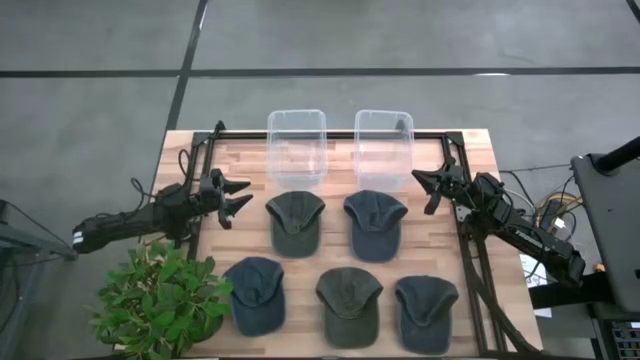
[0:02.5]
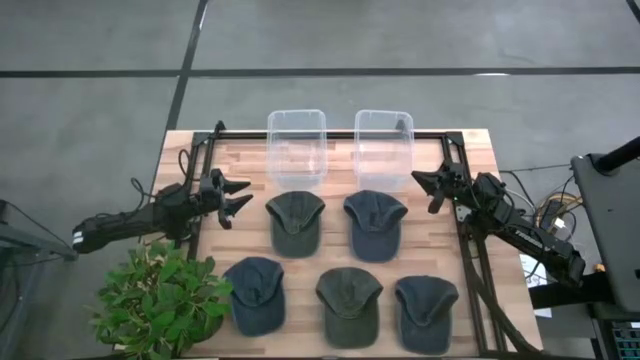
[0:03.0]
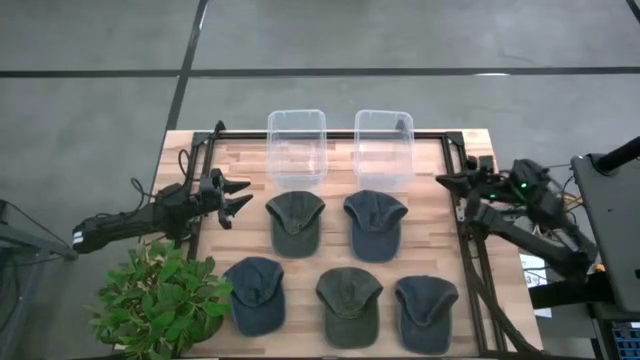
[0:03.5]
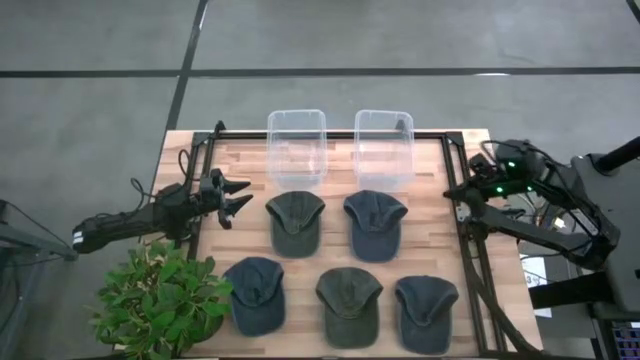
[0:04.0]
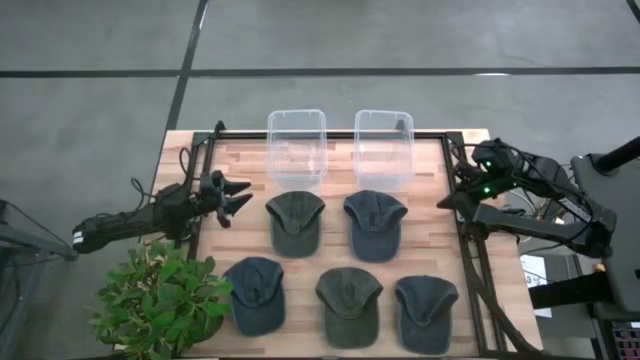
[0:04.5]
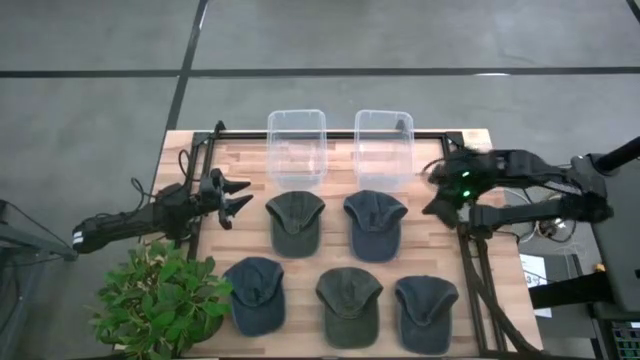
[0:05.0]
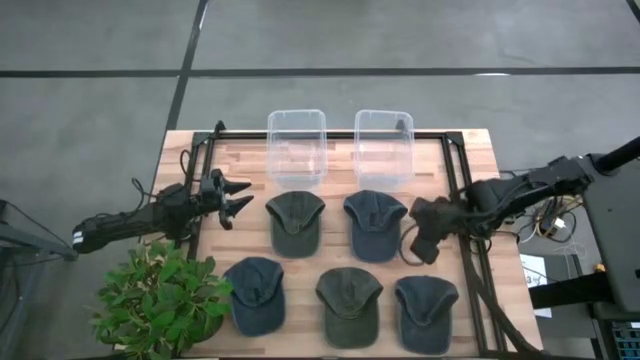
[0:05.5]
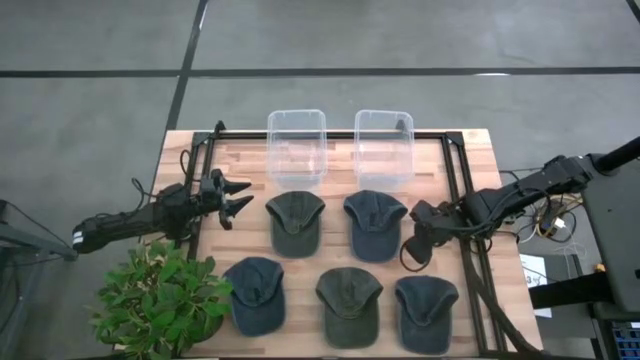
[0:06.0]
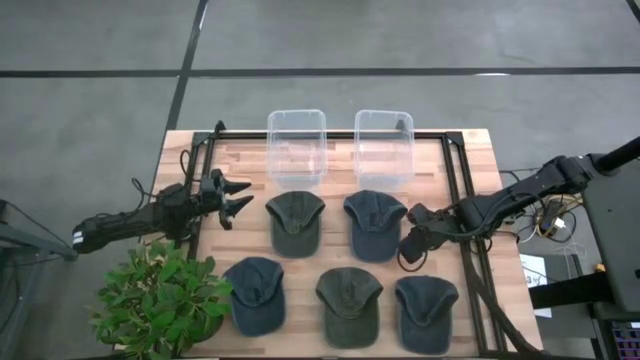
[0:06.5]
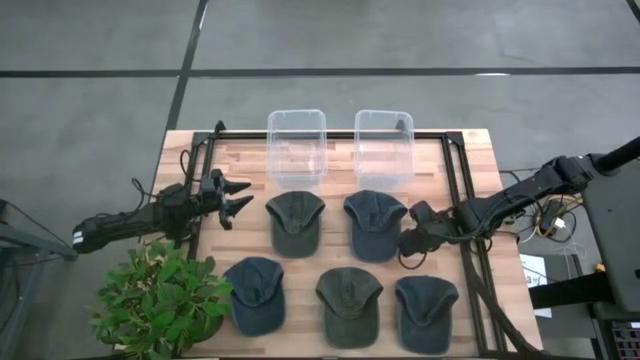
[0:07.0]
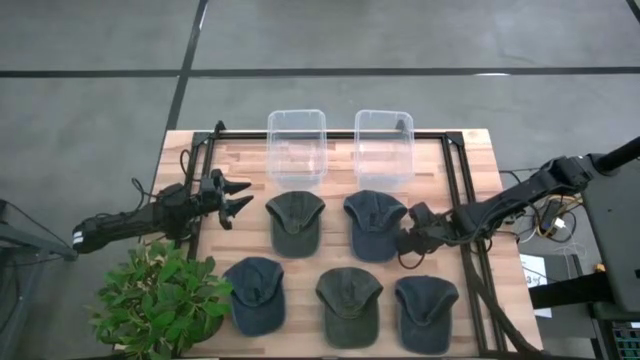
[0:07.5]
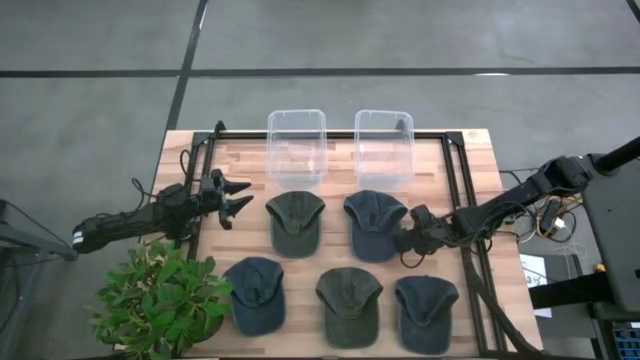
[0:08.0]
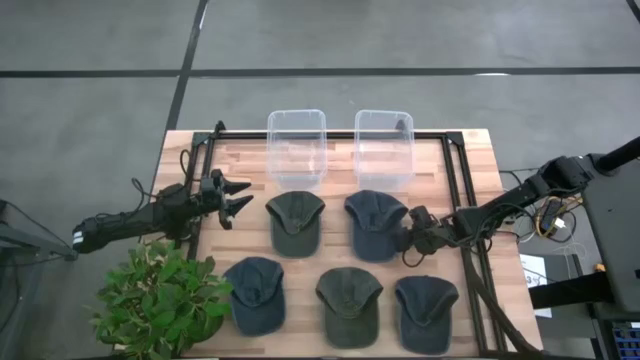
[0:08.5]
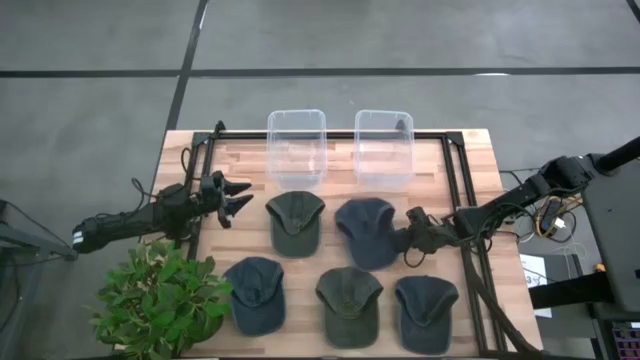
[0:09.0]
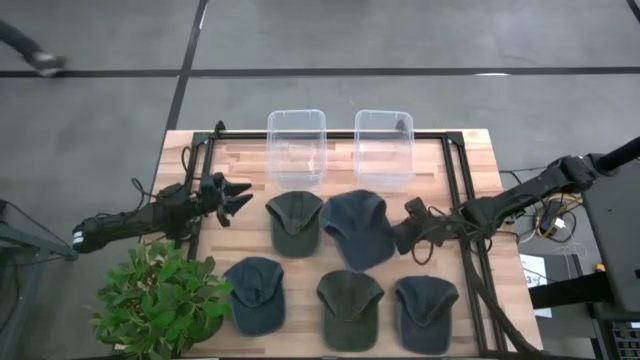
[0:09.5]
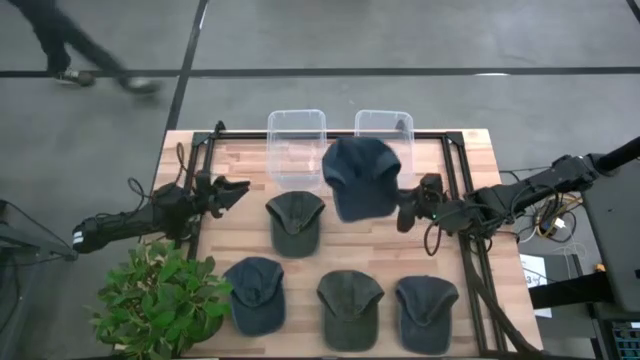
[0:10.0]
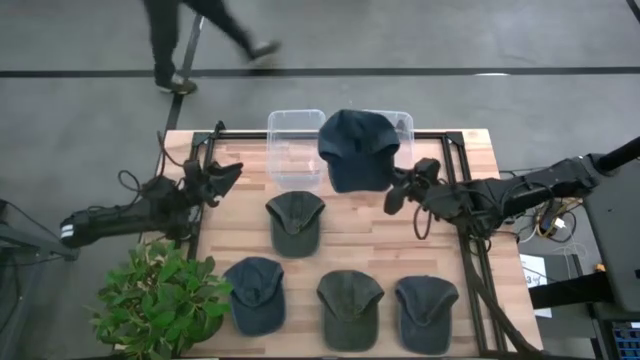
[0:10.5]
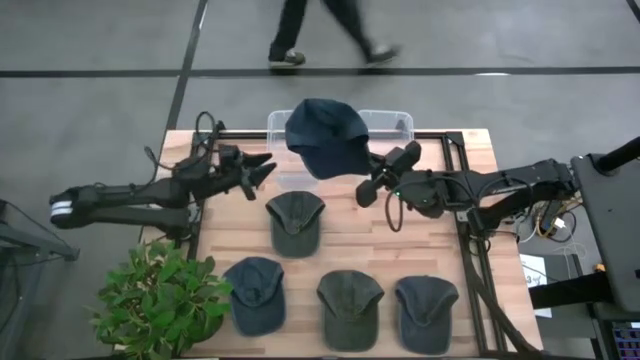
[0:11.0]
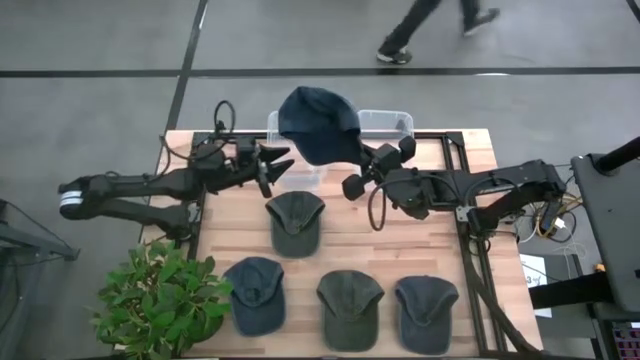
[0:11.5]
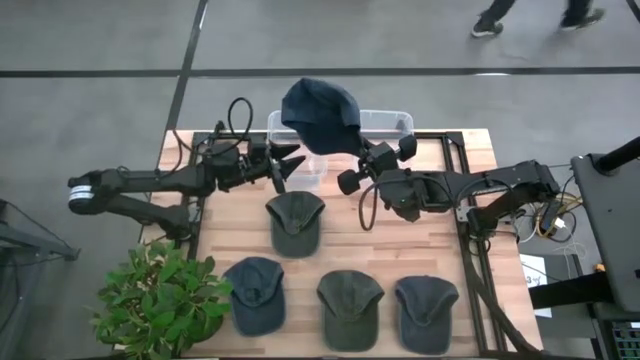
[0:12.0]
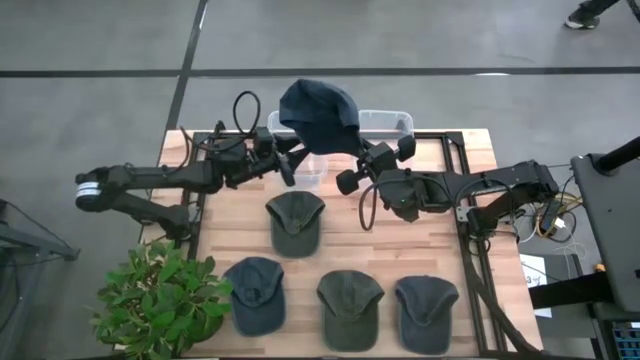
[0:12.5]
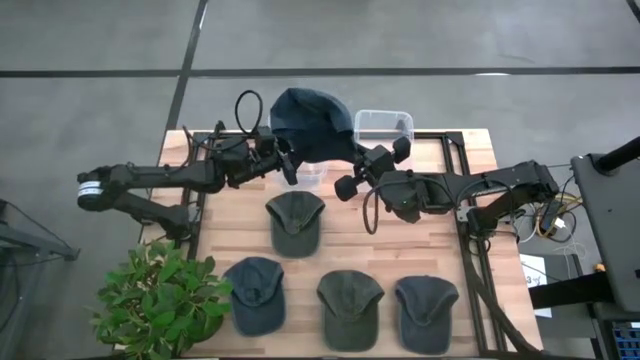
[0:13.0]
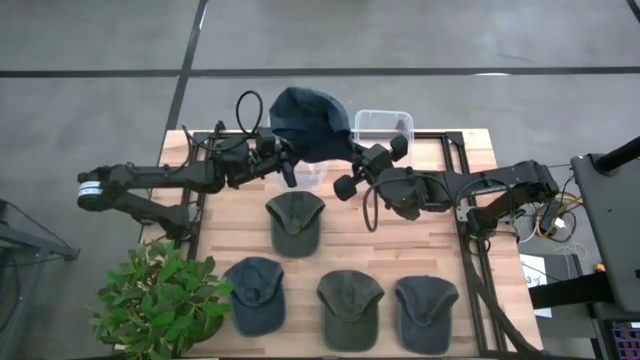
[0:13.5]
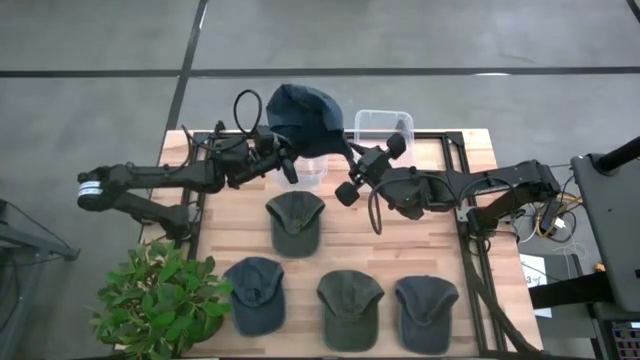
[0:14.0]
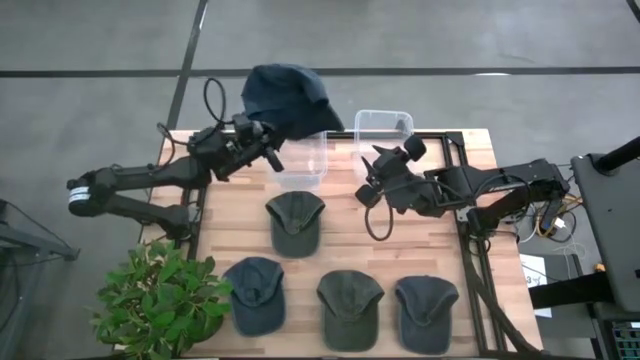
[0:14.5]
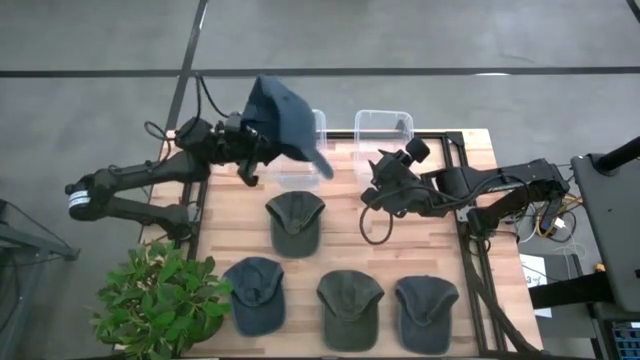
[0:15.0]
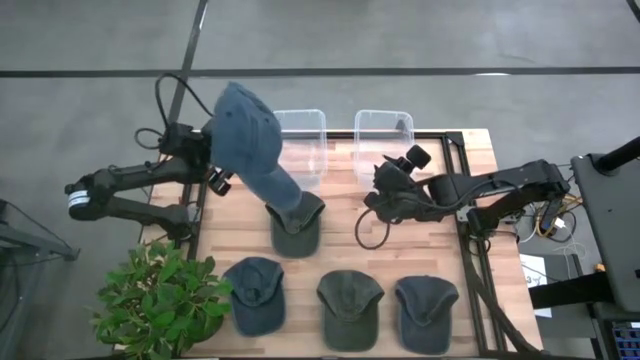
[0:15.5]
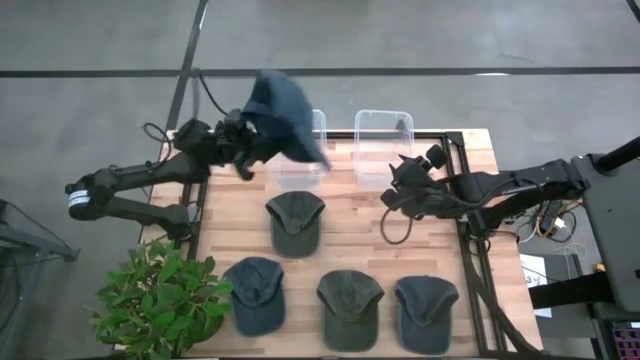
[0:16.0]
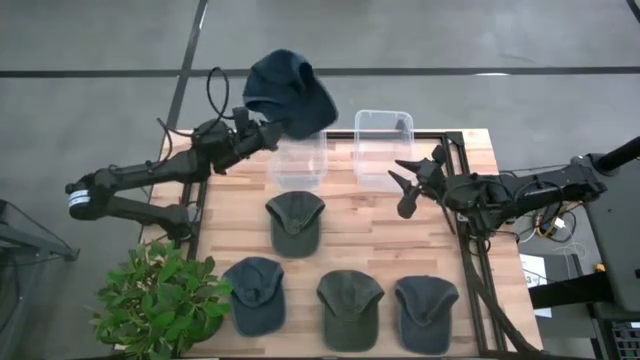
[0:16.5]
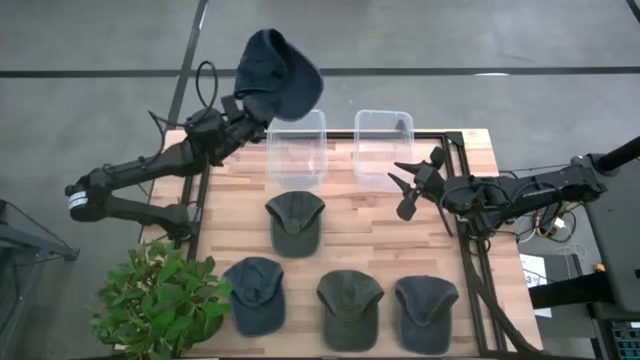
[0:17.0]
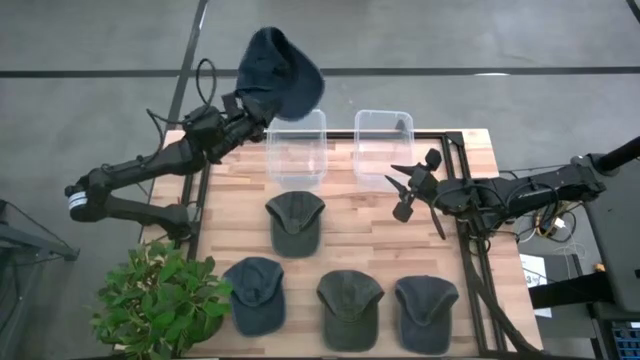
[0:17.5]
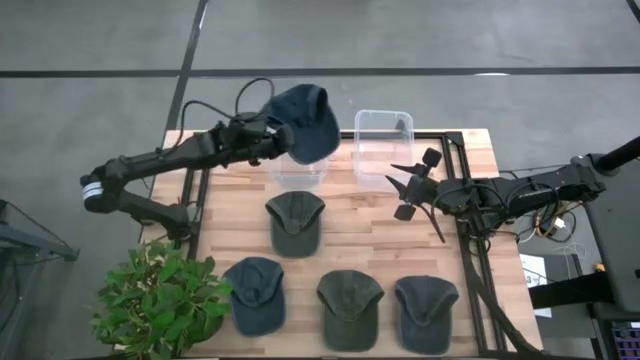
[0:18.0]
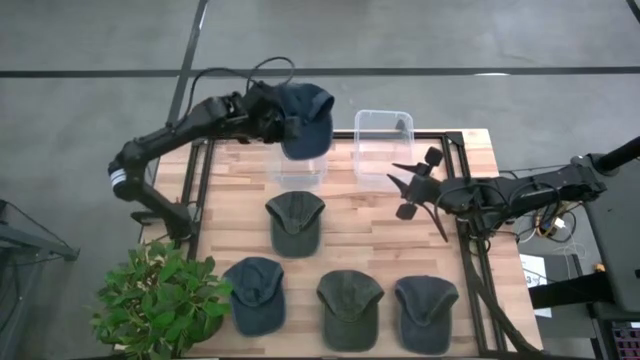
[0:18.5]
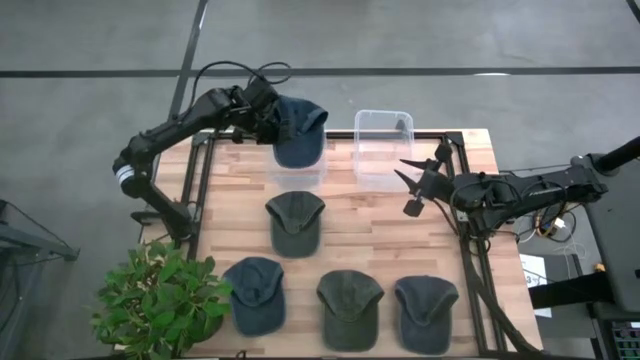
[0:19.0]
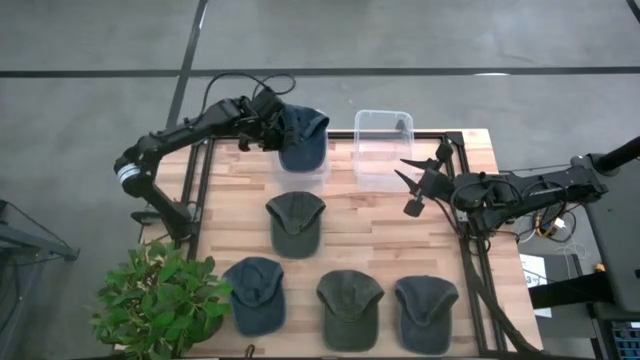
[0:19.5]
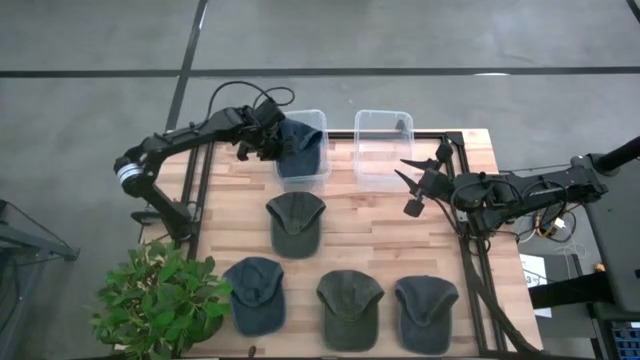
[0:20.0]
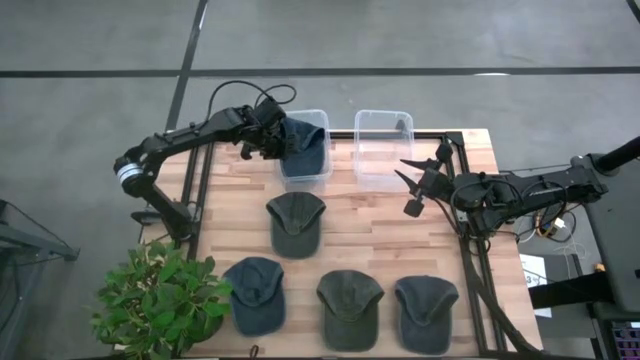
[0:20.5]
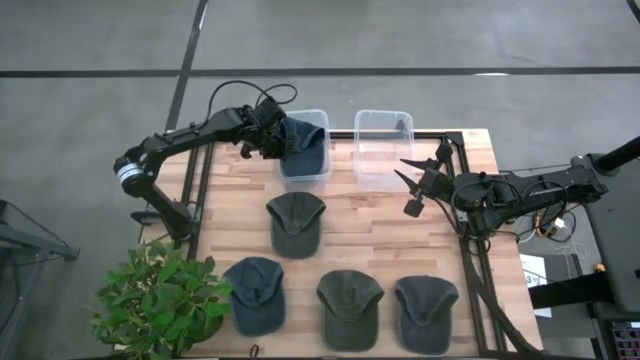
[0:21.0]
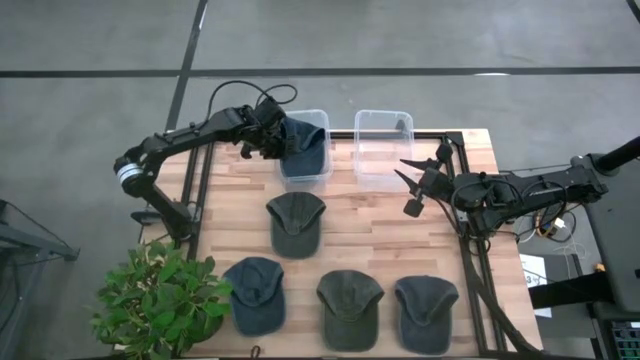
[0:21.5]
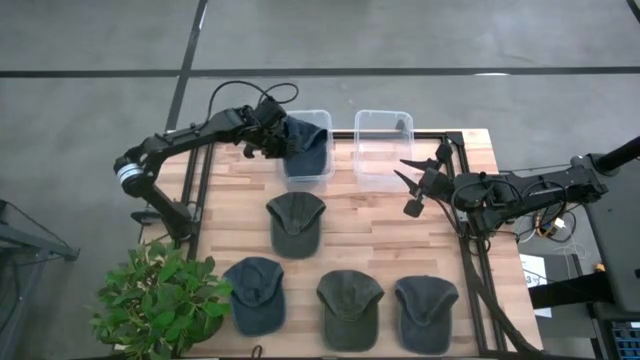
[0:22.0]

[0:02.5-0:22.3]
Task: Pick & Place hat
Put the top blue cap into the left transparent bin
